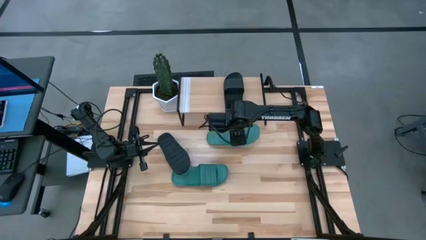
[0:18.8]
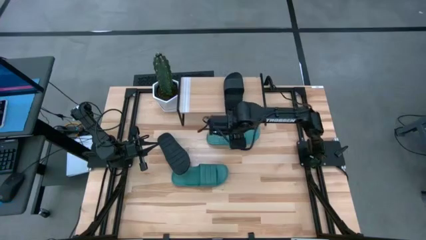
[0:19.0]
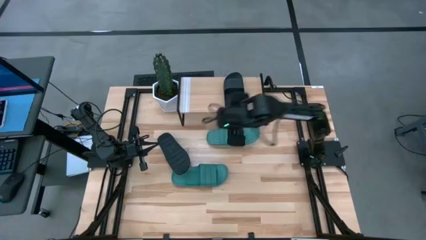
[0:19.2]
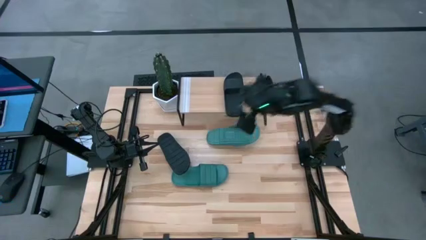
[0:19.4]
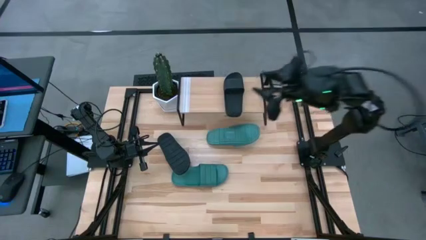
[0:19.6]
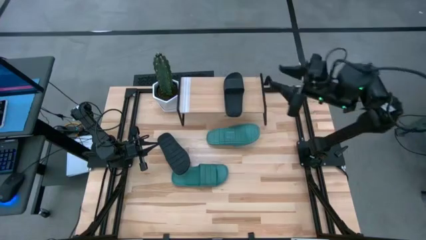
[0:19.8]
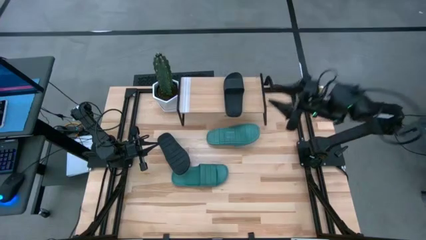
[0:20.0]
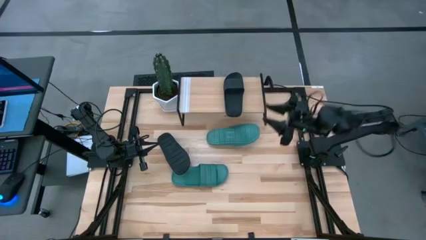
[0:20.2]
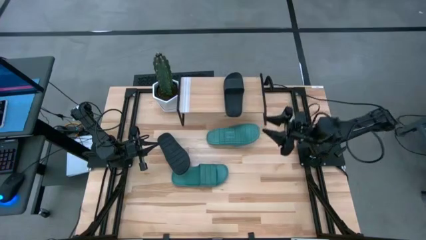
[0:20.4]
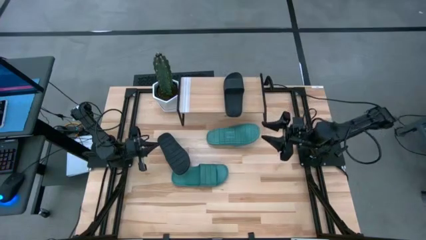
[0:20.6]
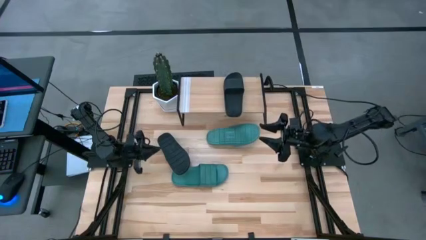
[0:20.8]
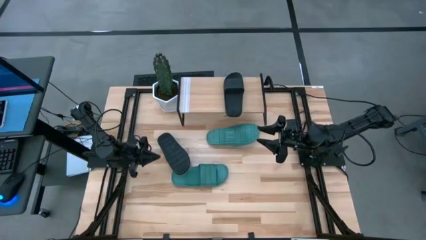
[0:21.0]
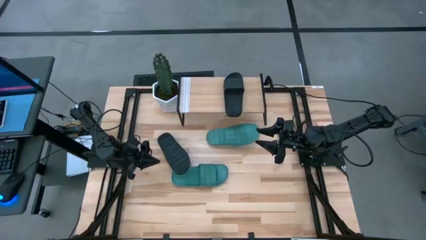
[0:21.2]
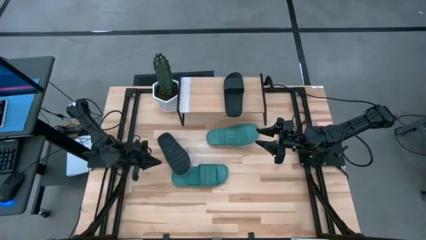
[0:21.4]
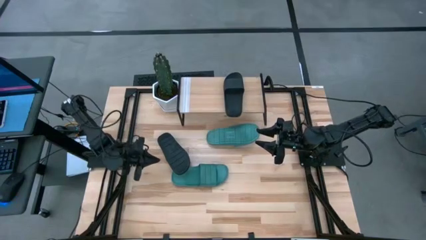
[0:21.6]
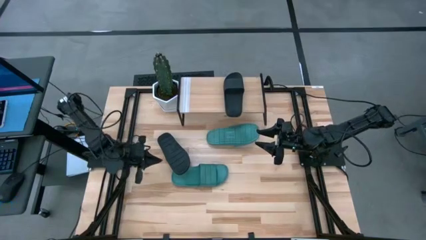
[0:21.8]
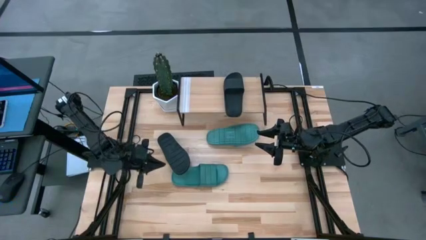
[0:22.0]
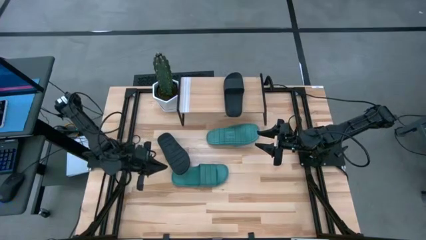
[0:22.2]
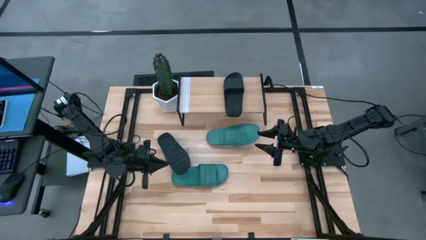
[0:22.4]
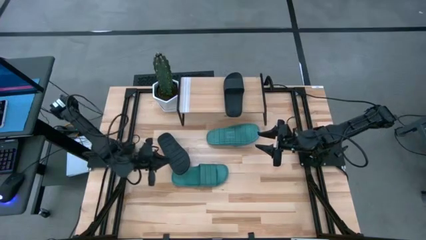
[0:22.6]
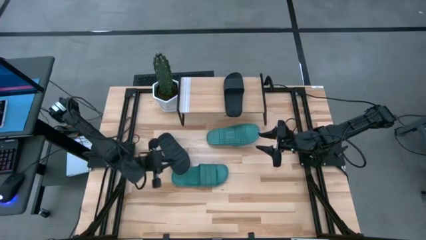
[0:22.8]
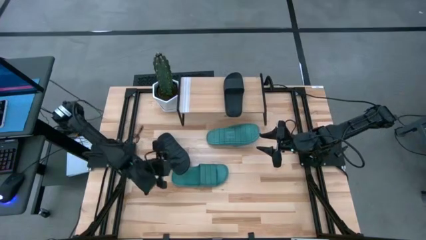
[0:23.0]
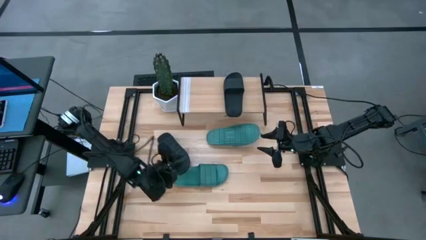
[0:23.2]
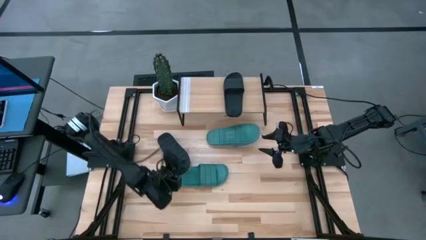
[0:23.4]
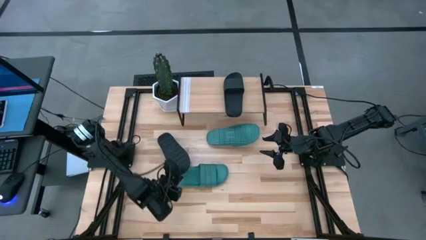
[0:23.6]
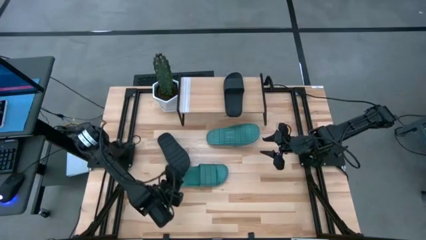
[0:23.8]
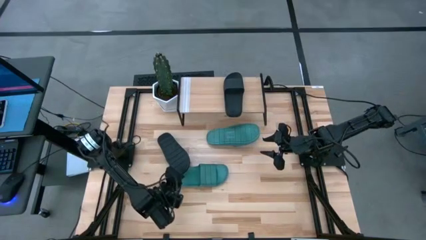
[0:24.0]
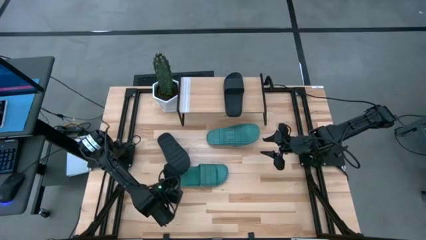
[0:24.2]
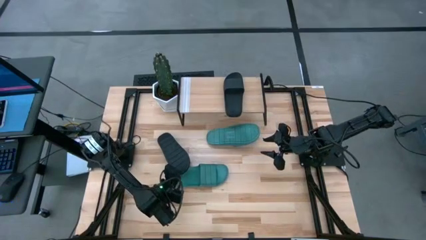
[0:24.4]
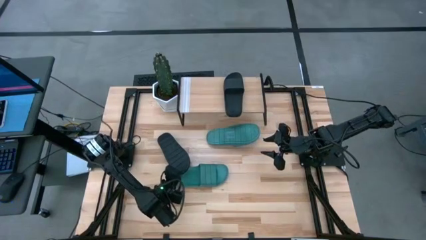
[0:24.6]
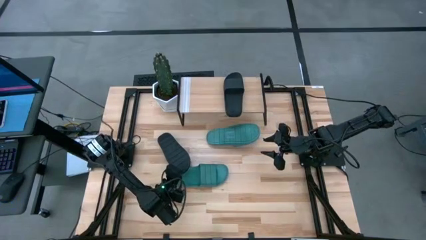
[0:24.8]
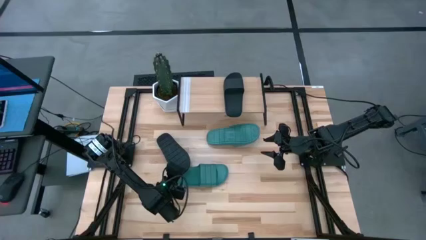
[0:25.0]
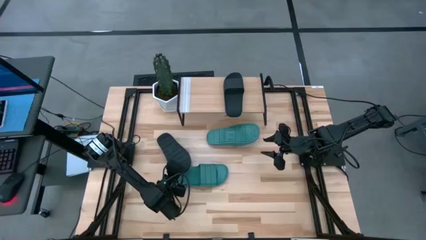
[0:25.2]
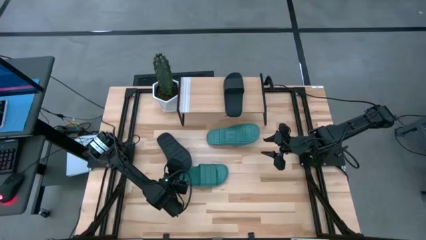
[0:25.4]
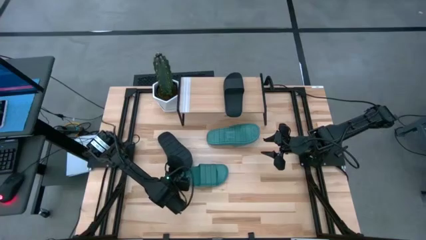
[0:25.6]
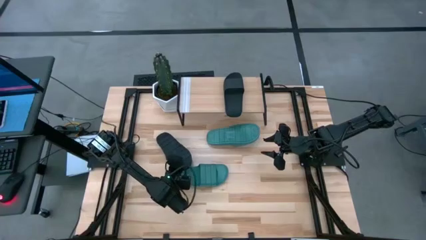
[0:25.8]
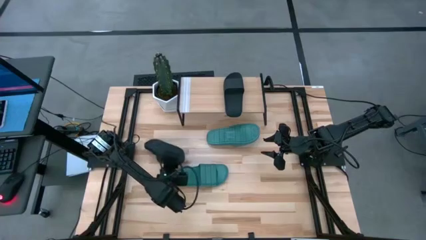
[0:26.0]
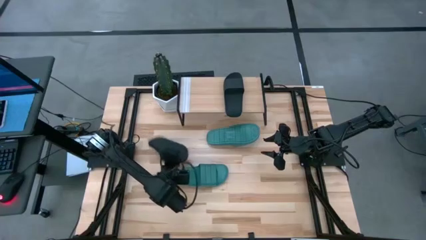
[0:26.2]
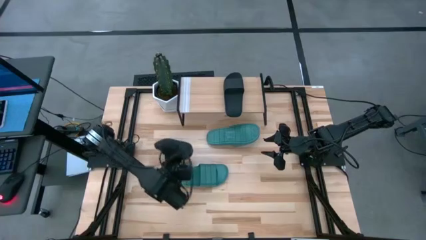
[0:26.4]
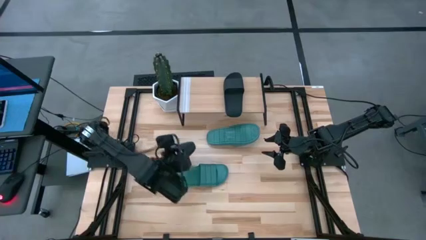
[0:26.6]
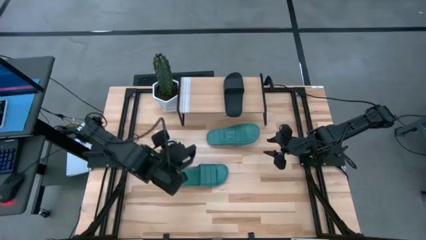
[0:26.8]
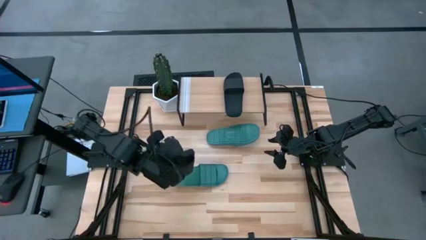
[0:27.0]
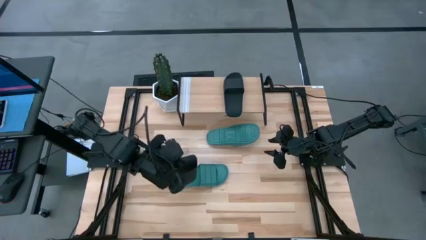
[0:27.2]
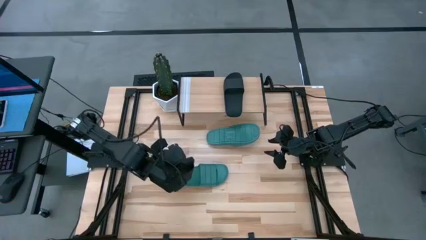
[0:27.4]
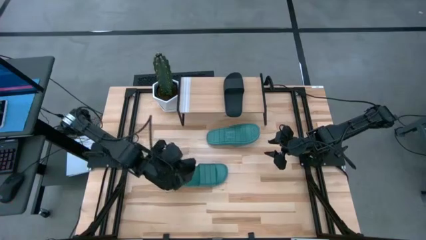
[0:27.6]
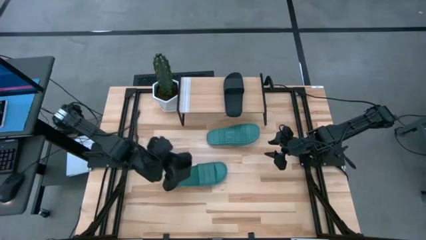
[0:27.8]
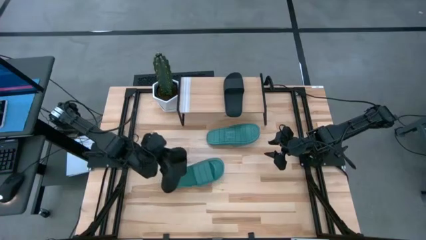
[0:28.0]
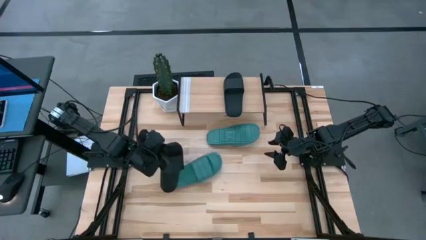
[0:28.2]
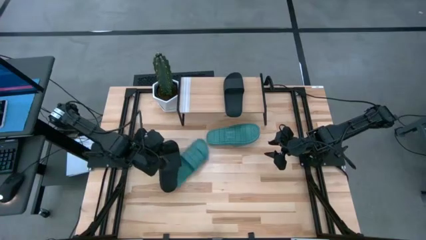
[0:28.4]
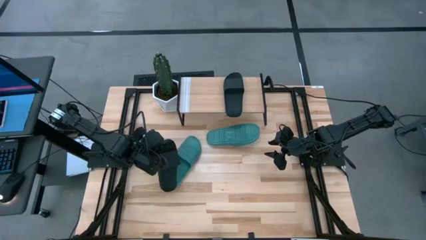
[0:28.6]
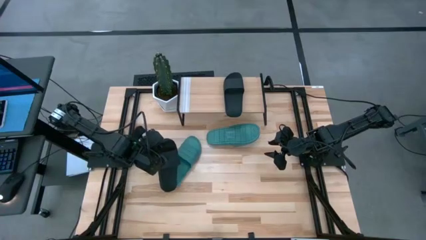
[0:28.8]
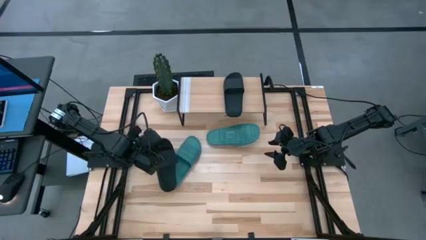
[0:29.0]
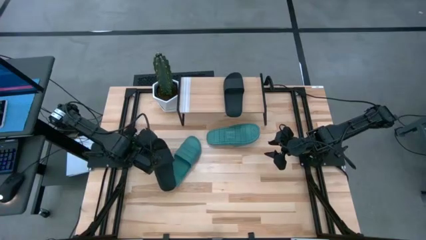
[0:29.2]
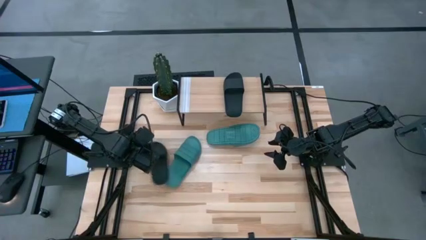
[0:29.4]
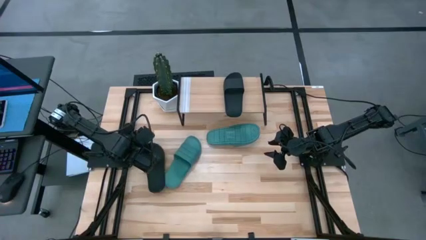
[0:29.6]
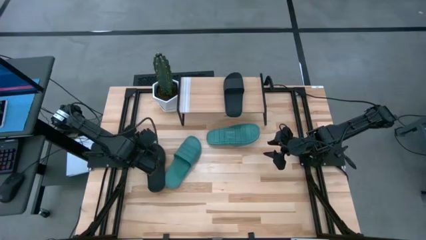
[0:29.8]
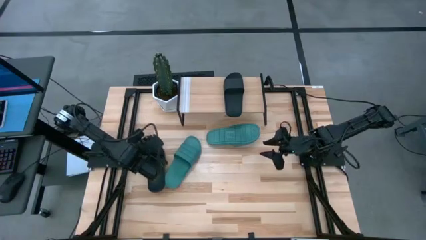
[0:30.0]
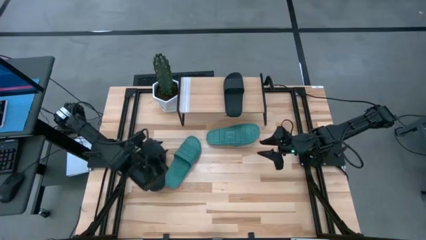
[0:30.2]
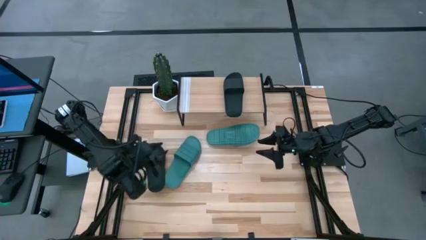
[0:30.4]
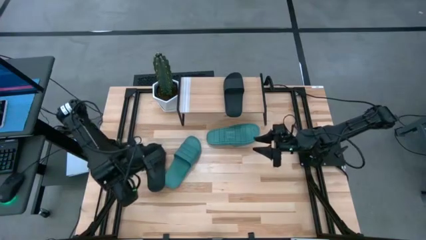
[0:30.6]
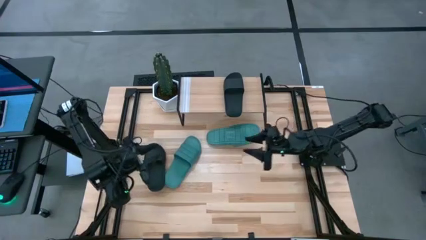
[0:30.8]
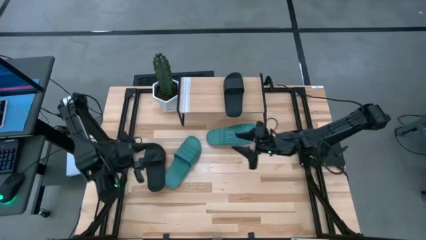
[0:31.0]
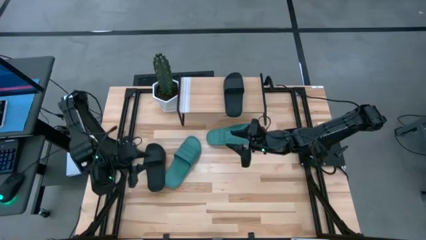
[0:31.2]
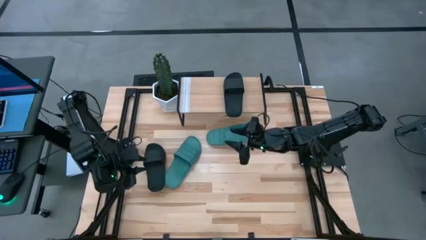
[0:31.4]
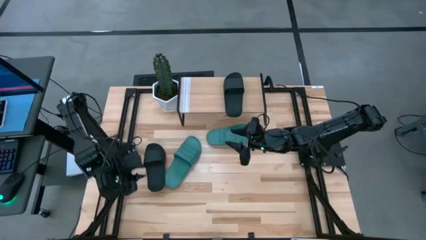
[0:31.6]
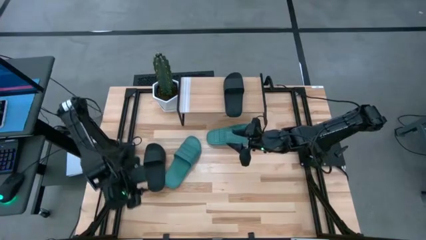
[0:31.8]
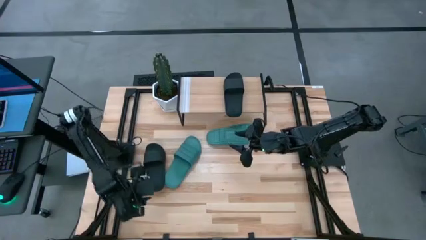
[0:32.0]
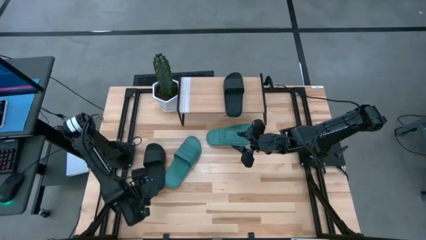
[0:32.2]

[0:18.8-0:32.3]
Task: Pick and place slides into the shelf
Put the black slipper on the shelf

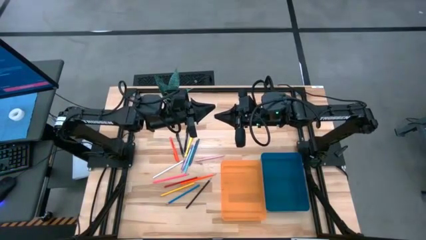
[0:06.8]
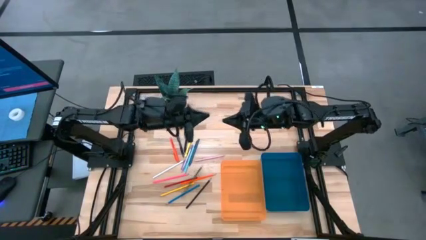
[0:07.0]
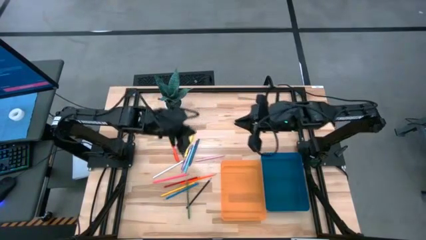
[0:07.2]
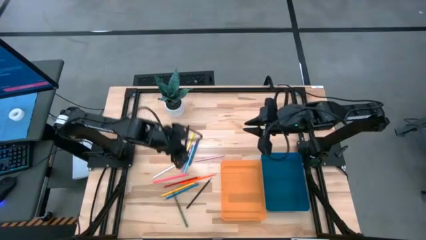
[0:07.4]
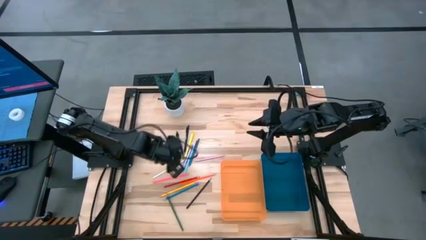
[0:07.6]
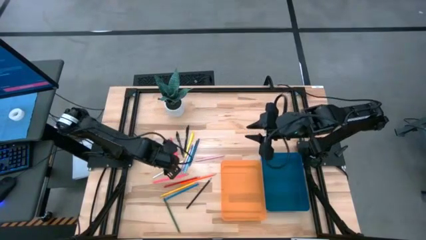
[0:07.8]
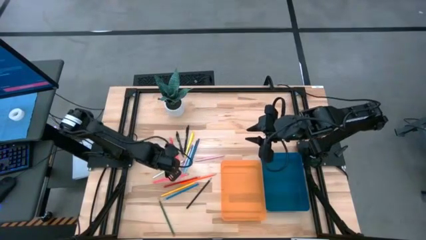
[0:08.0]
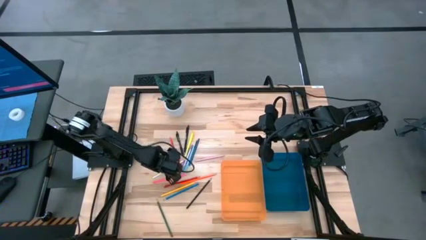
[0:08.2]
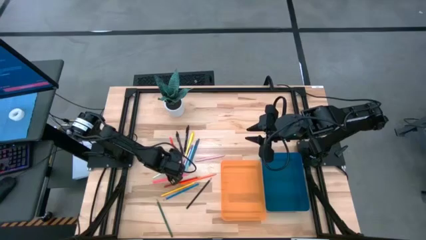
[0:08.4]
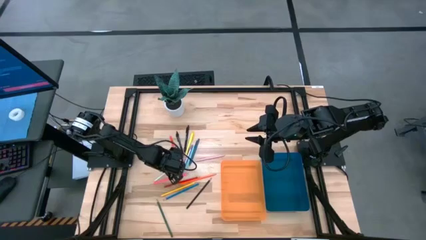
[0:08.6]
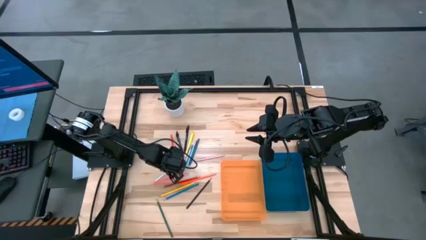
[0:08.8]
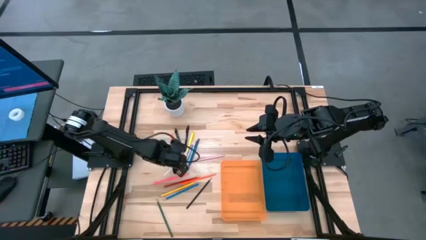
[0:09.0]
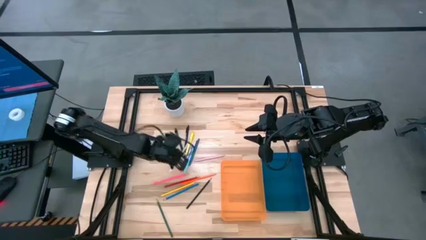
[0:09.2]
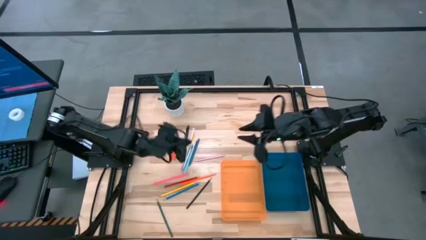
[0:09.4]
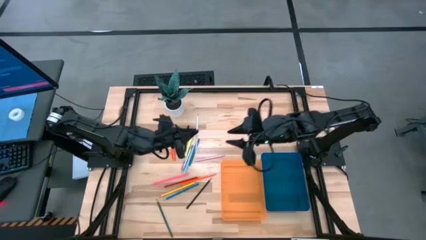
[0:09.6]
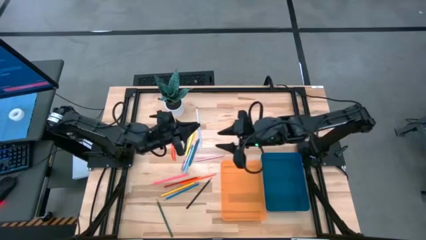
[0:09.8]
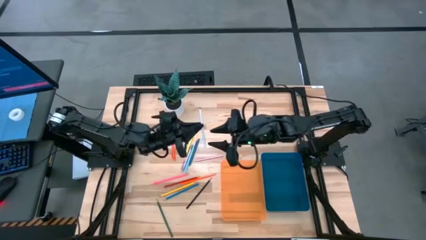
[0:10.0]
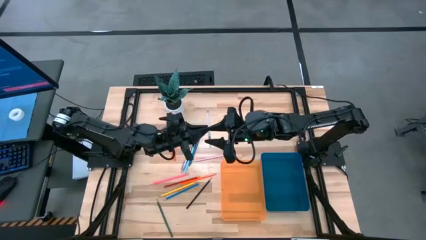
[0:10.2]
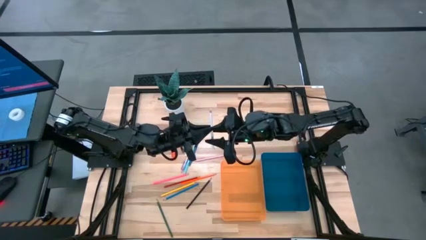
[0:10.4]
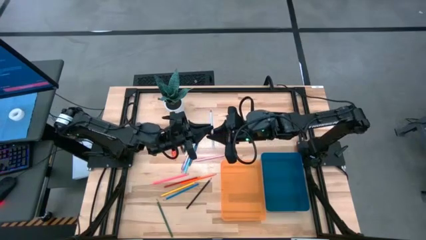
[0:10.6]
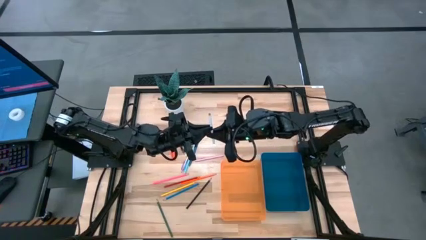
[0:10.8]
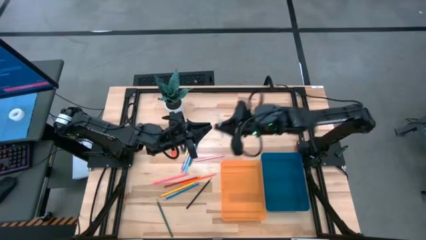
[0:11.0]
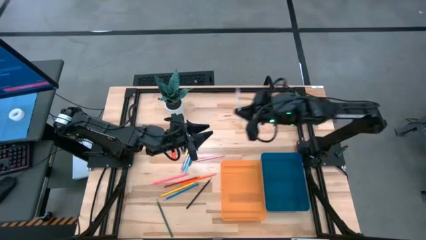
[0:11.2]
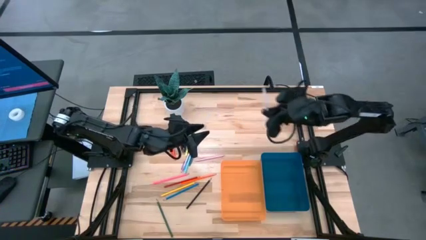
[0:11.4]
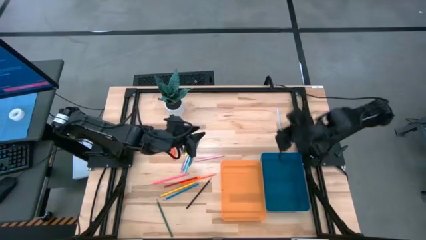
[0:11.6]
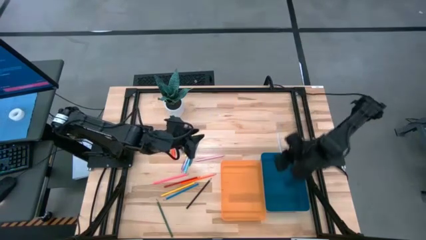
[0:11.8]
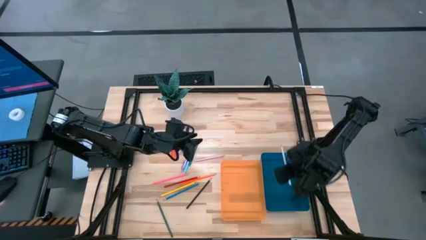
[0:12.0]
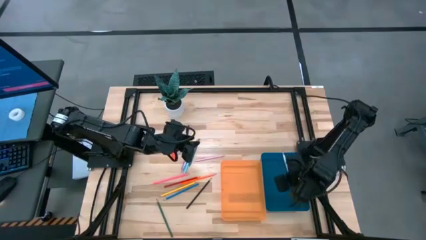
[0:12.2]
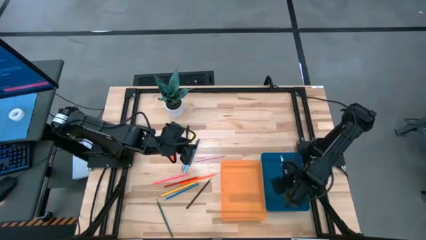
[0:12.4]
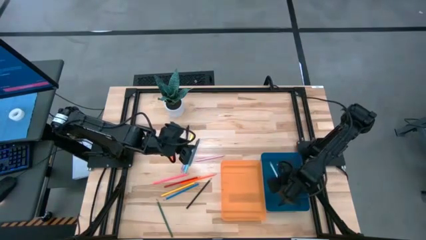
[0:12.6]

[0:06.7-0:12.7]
Task: Sort pens & pencils
Put the white pencil into the blue bin
